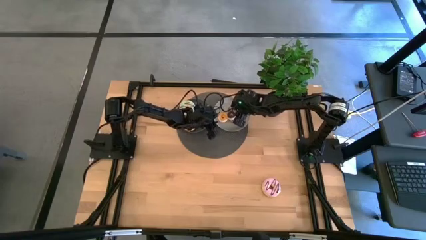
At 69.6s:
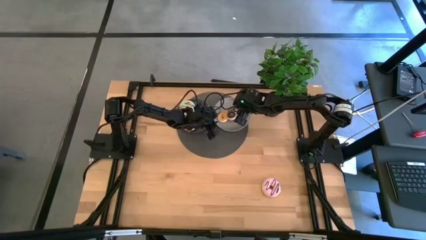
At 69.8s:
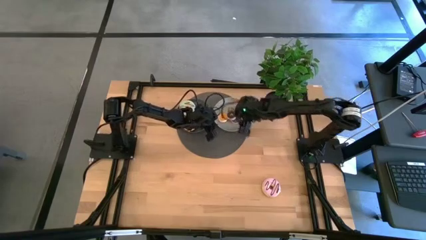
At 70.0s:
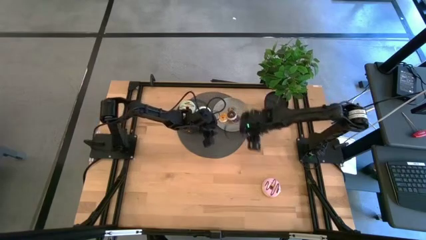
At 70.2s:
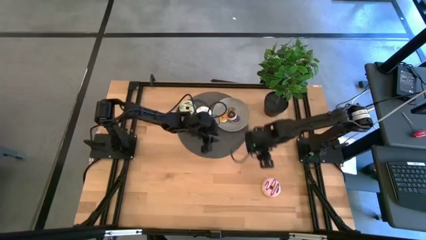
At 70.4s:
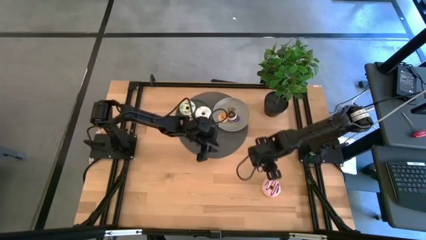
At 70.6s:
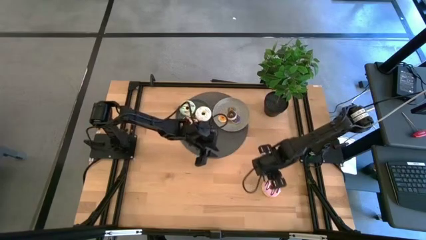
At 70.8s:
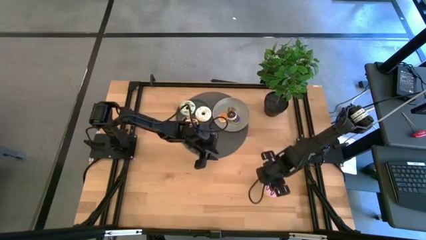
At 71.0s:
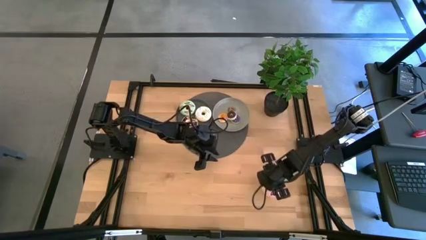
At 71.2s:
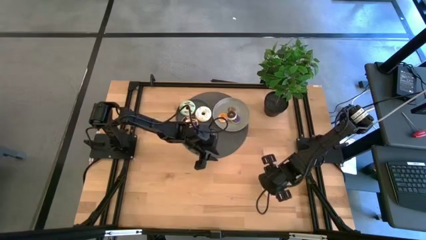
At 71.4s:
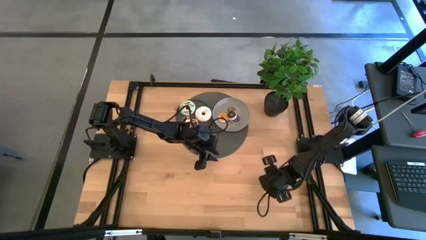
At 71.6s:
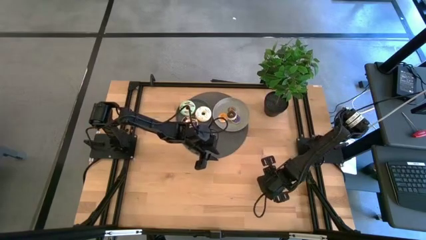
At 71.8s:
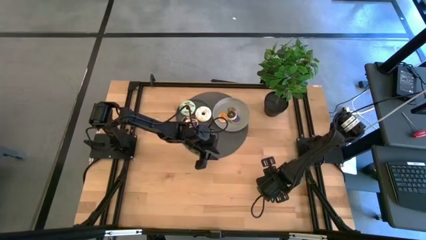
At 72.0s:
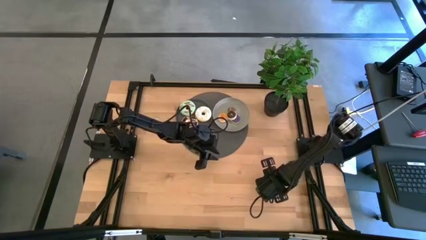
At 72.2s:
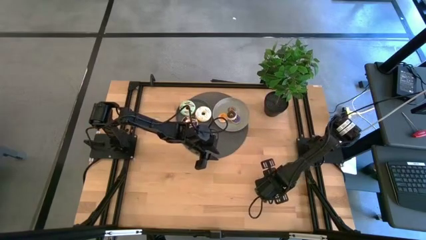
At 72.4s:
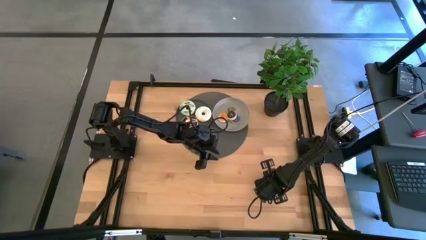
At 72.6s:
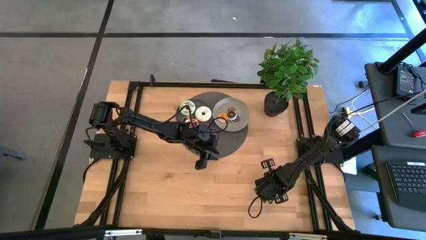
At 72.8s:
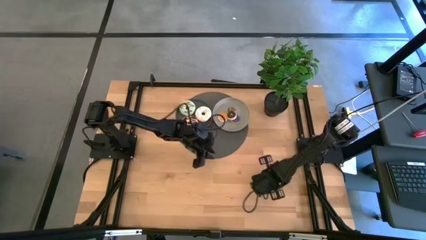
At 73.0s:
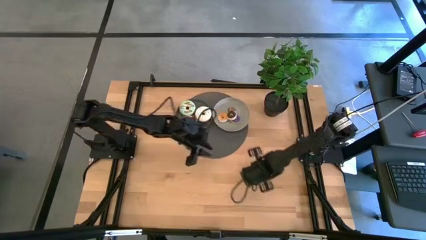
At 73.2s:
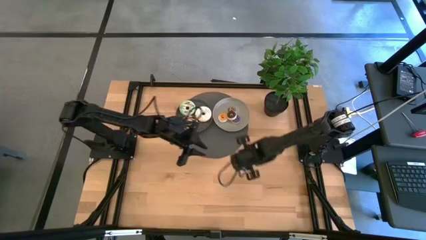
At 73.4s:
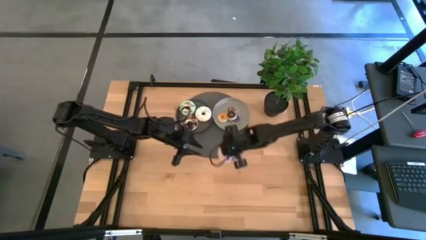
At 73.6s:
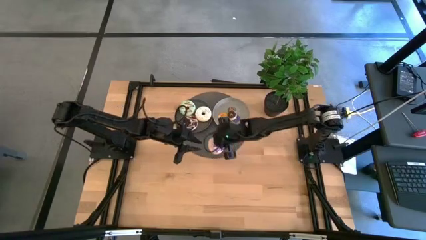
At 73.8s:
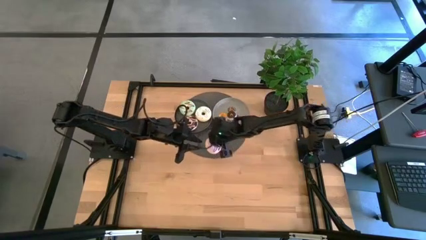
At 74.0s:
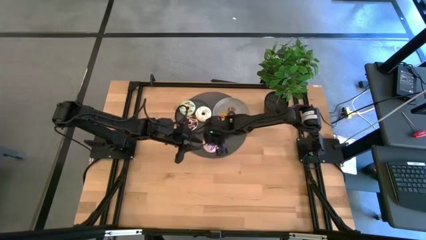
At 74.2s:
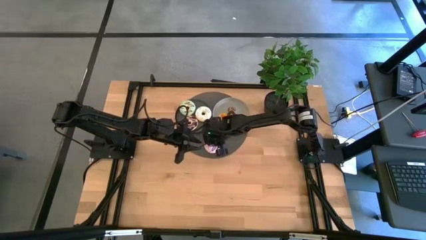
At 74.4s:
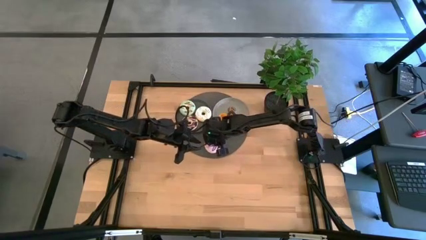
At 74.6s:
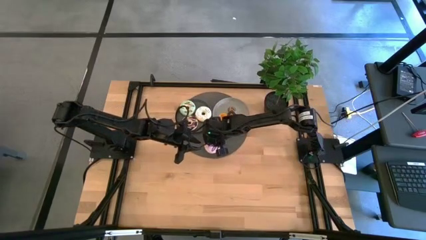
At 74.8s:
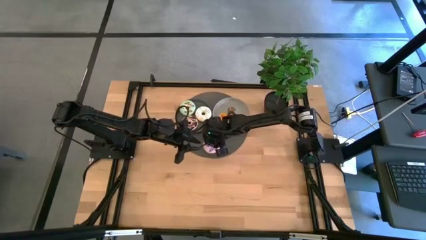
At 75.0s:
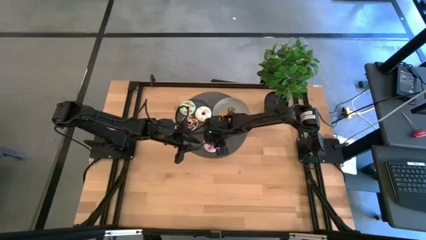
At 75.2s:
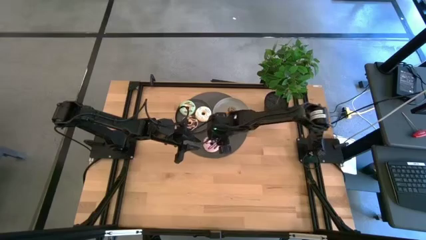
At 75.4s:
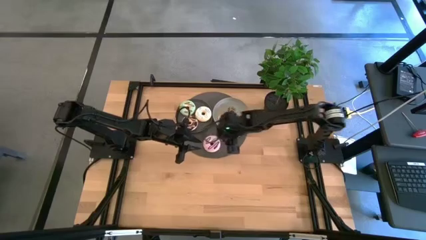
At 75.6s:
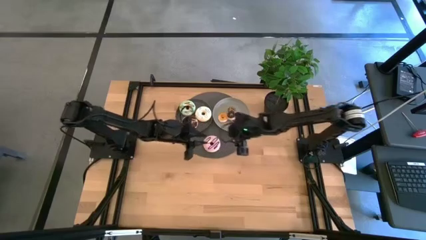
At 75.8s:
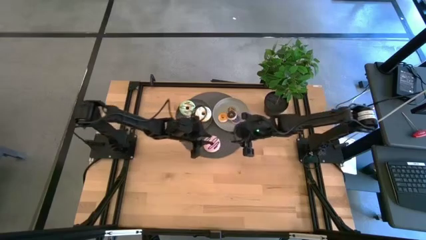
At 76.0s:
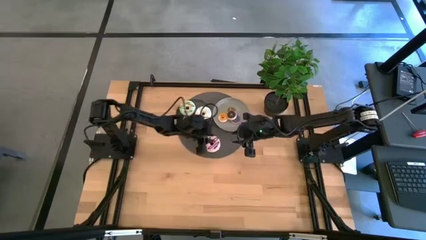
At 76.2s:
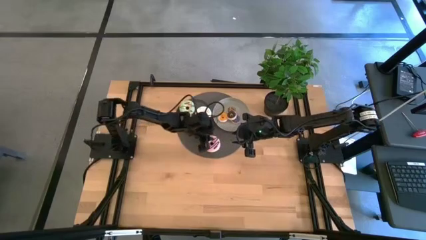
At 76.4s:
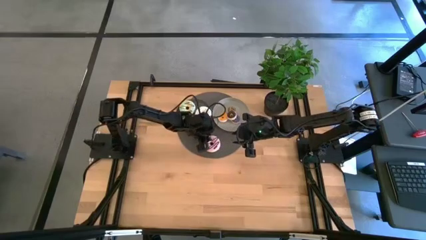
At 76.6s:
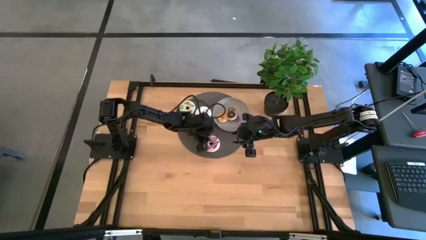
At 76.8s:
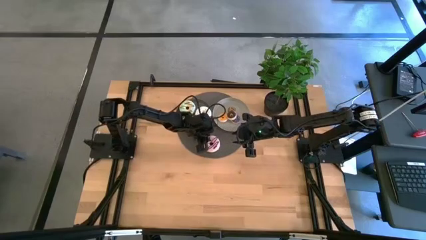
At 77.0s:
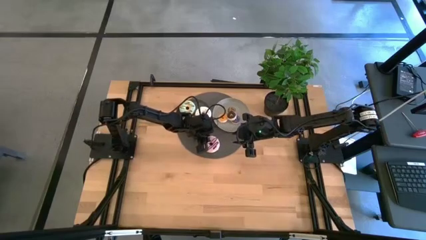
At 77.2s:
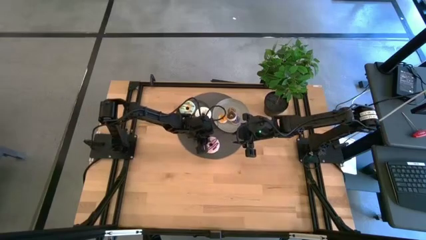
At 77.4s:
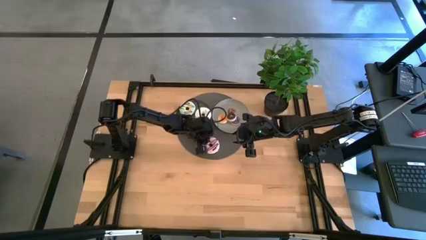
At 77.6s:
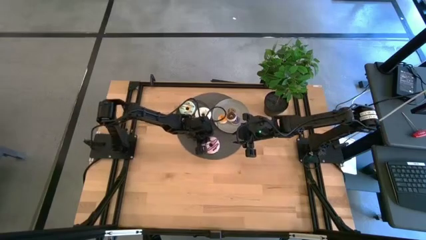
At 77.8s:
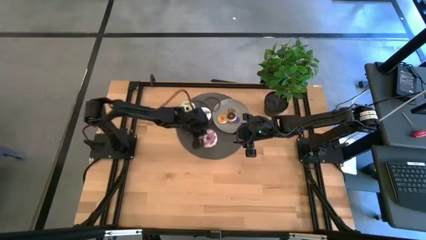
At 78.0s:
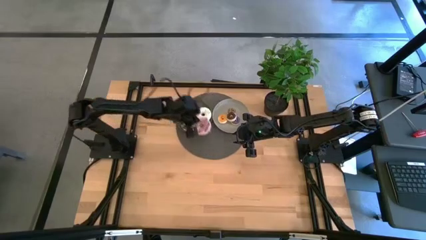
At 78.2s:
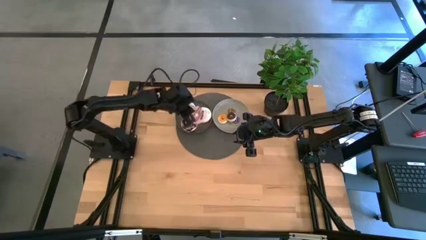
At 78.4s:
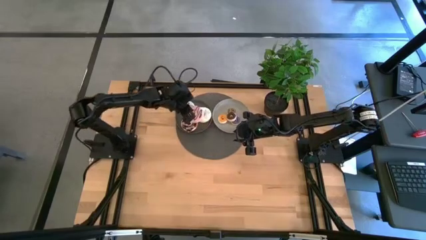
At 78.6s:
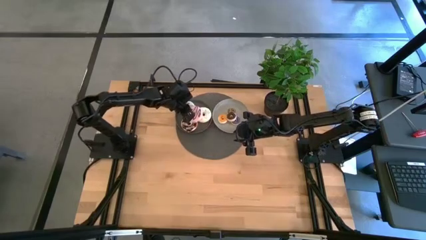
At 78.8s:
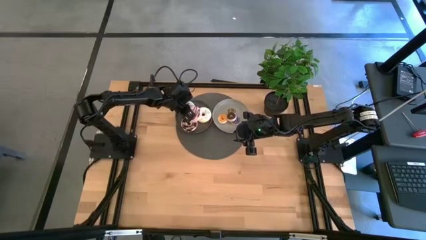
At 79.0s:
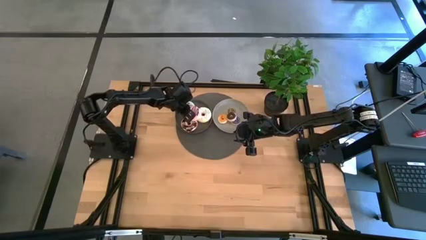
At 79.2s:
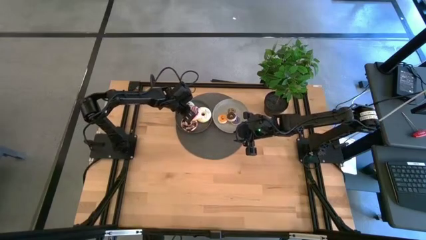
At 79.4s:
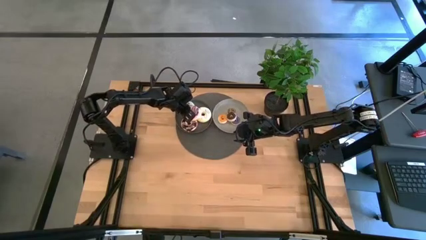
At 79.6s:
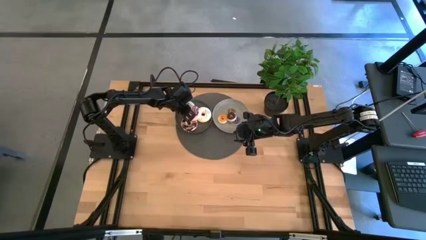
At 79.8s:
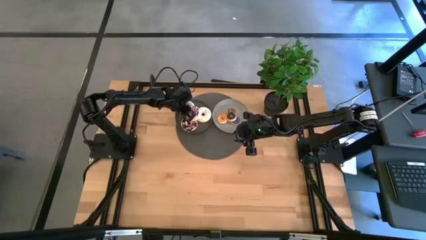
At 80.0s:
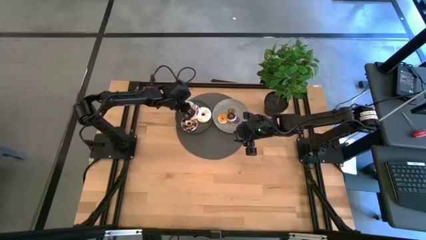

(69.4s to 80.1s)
Task: Pick & Place donuts
Put the big purple donut on the black plate

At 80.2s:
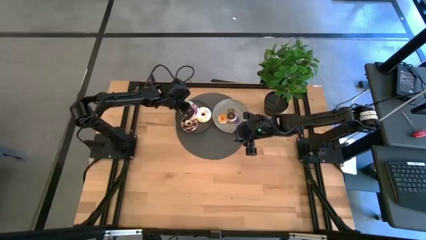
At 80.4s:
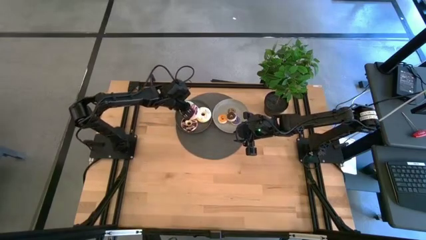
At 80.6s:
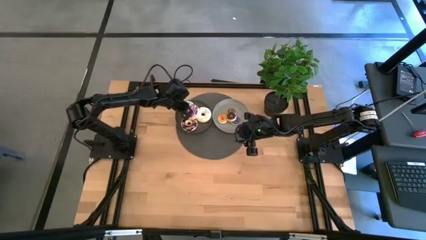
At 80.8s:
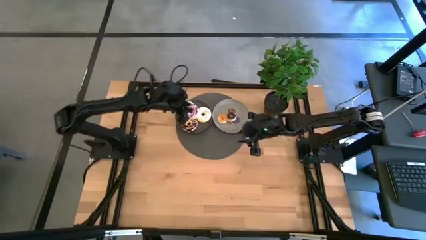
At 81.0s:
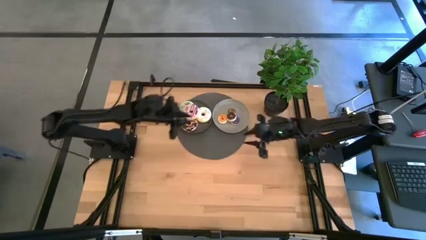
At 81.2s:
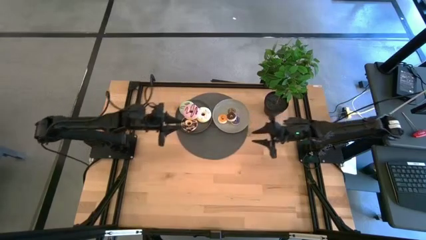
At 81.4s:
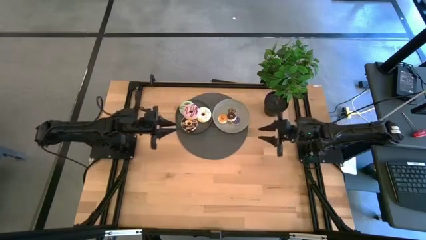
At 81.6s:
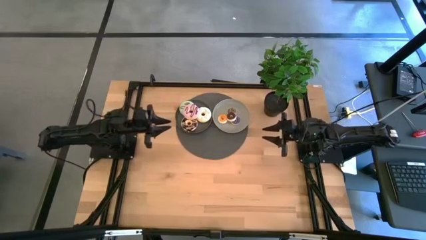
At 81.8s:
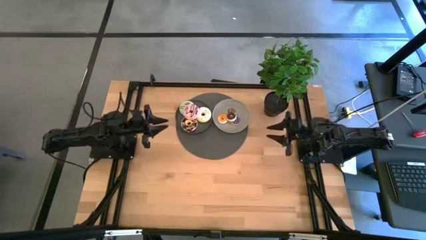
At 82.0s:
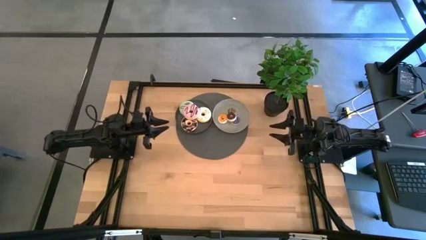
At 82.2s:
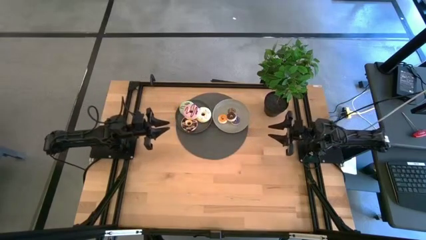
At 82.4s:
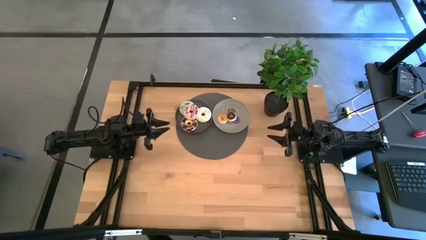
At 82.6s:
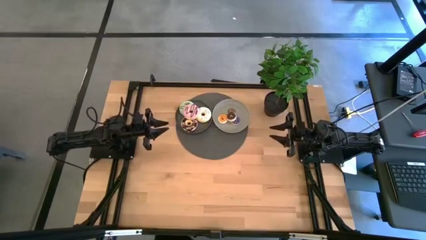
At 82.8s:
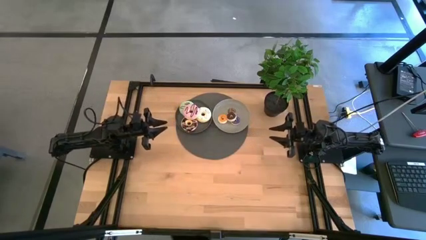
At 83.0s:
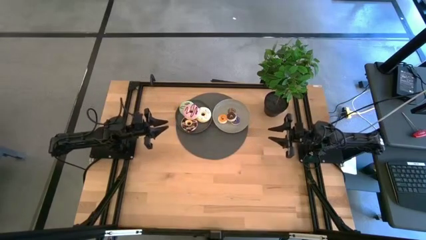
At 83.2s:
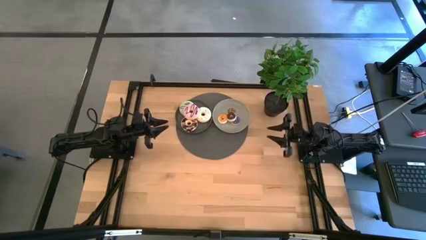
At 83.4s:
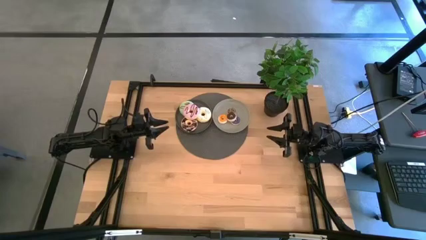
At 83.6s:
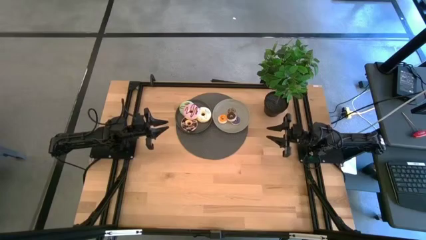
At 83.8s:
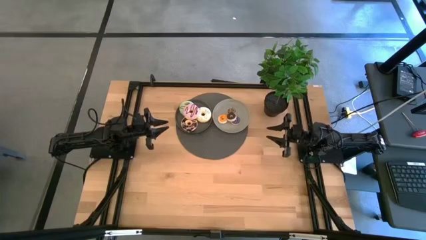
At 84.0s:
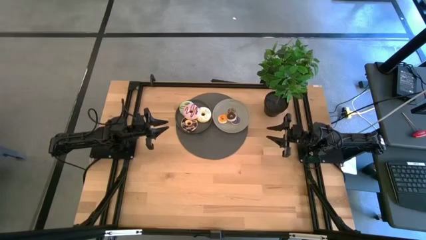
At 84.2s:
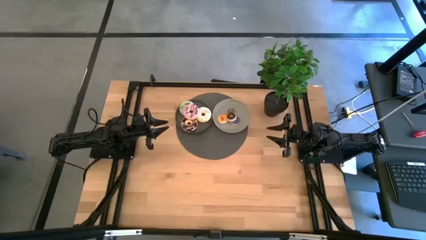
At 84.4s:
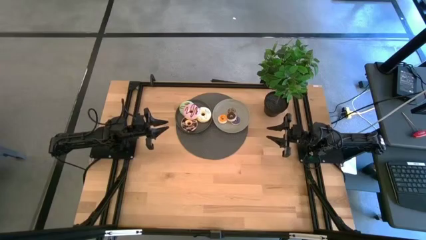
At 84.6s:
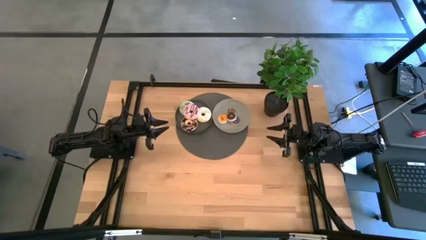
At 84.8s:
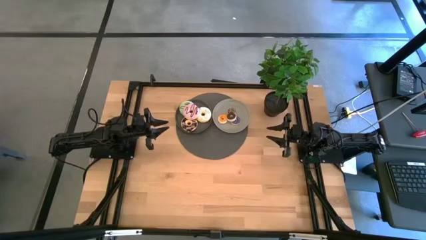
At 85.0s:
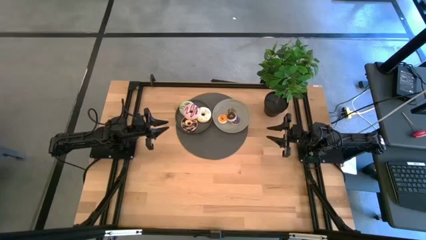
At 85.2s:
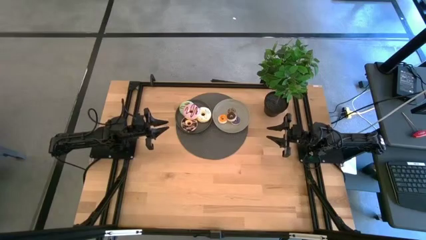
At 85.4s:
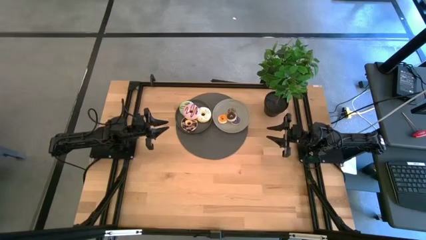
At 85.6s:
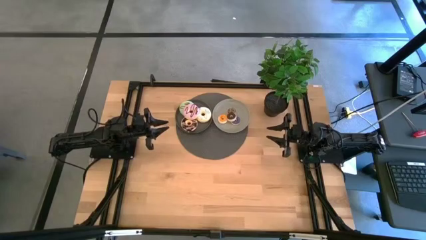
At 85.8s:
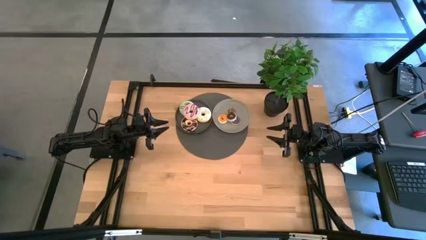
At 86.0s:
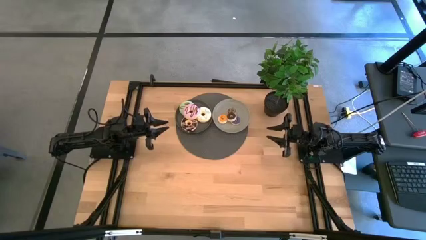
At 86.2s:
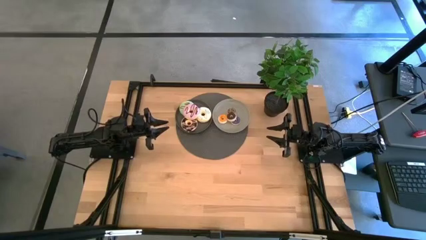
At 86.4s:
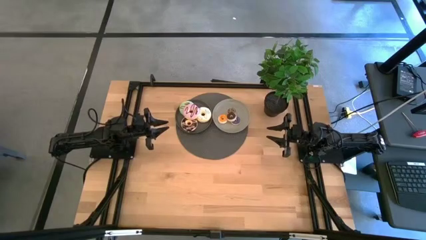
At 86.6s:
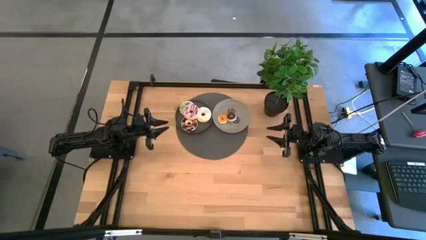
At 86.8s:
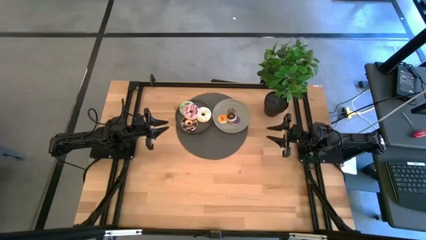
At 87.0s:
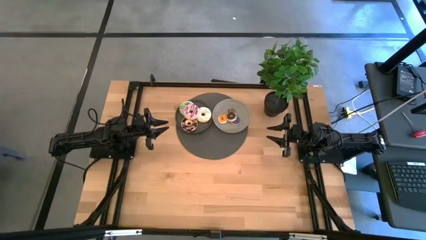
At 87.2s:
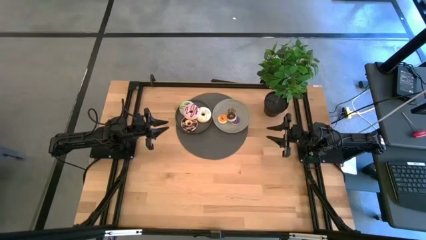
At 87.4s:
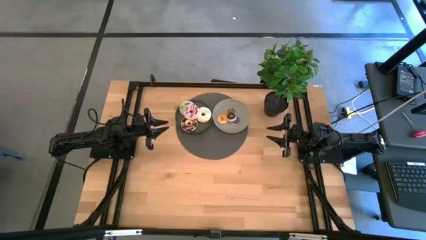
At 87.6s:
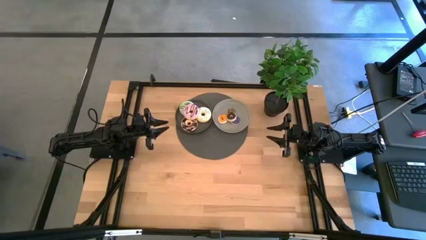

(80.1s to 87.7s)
Return to Home Position
